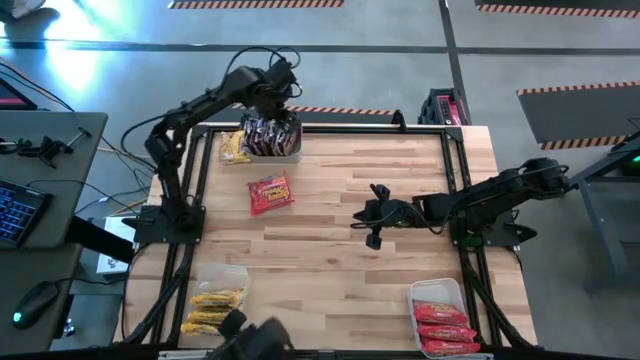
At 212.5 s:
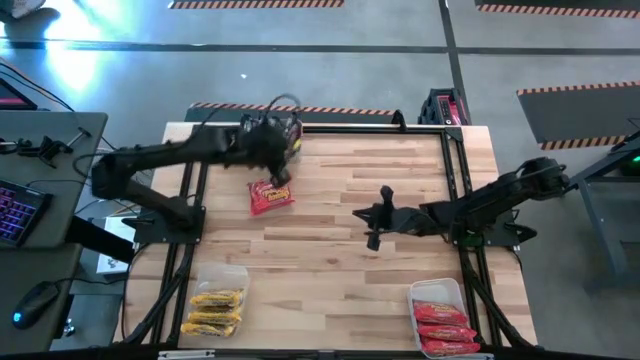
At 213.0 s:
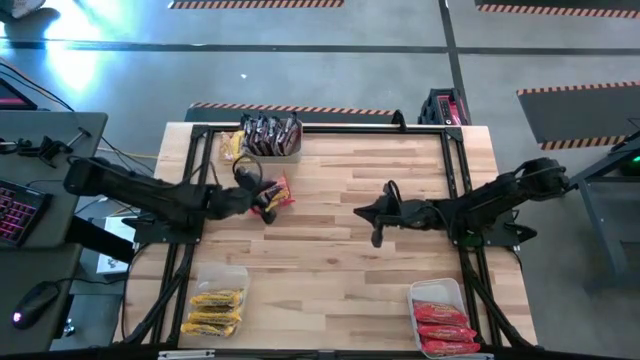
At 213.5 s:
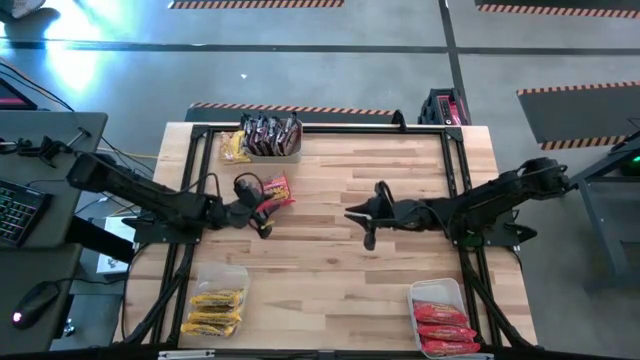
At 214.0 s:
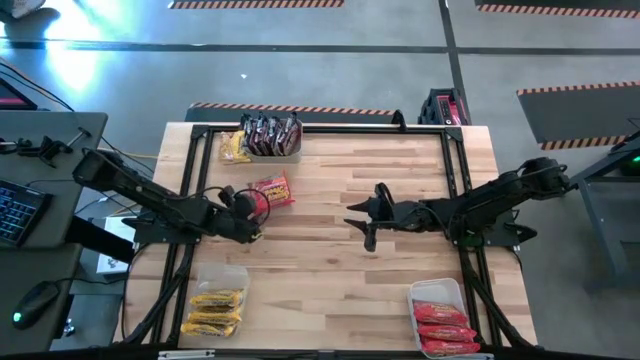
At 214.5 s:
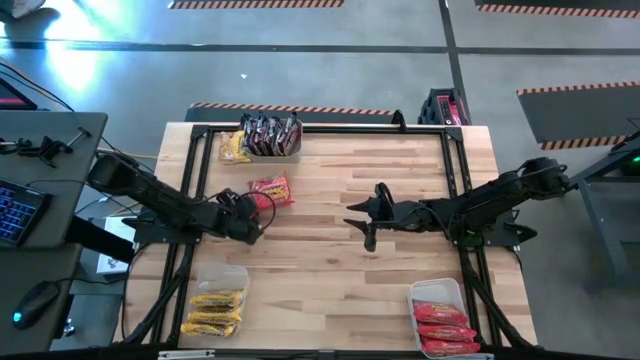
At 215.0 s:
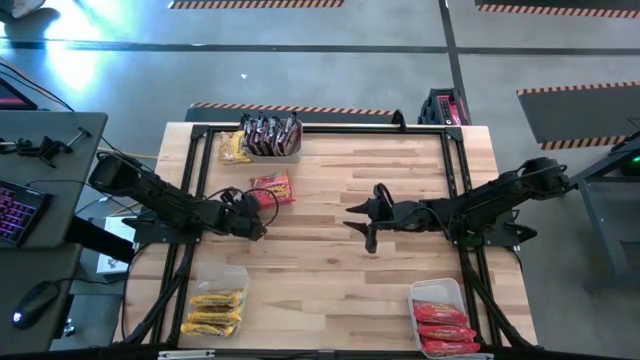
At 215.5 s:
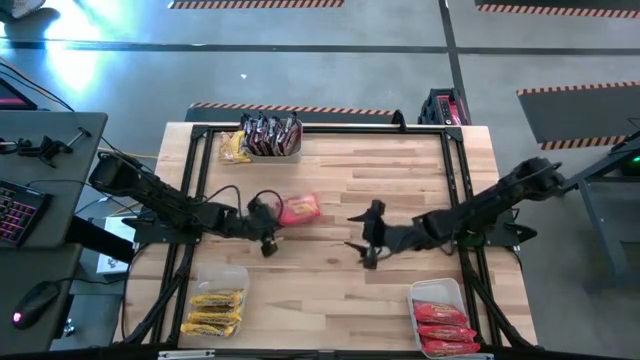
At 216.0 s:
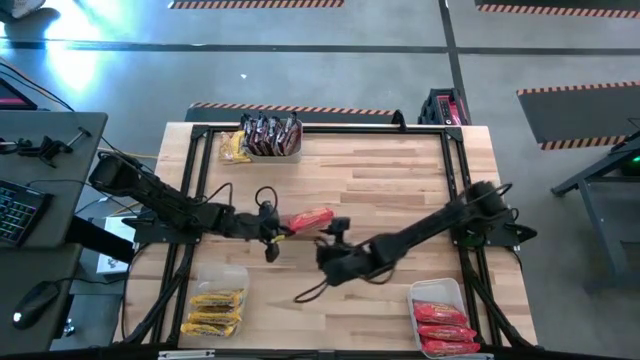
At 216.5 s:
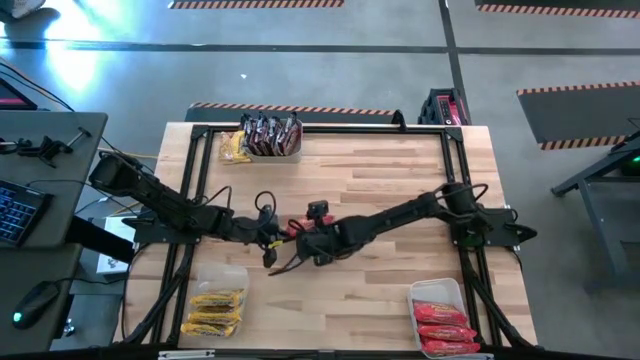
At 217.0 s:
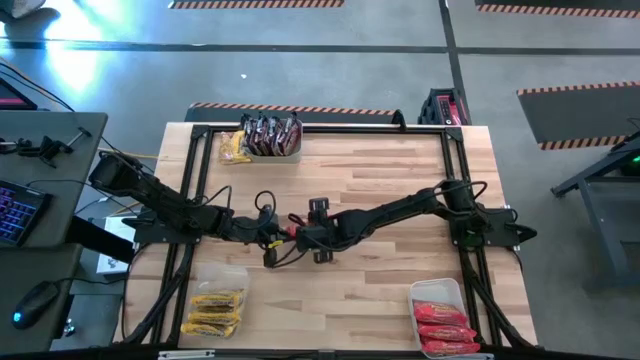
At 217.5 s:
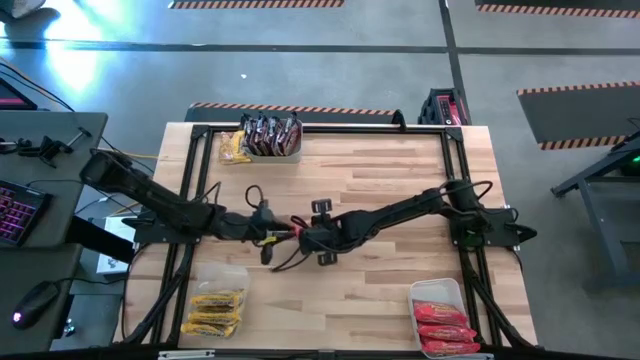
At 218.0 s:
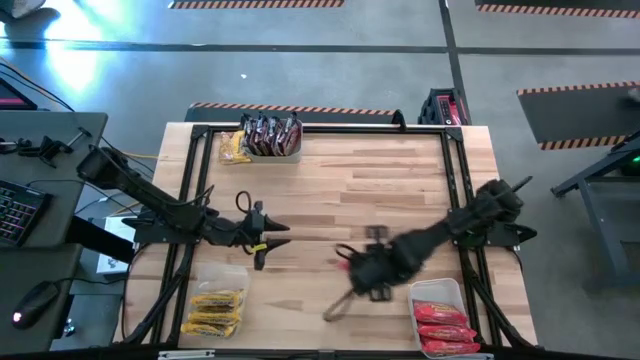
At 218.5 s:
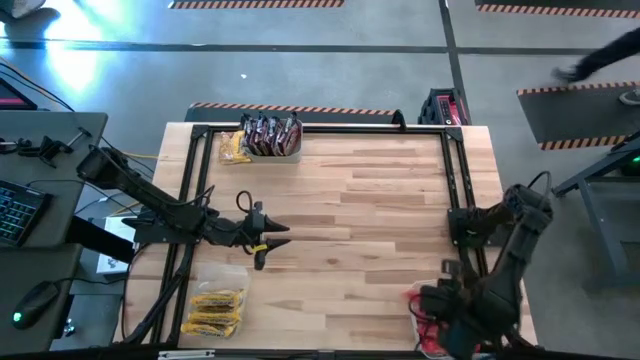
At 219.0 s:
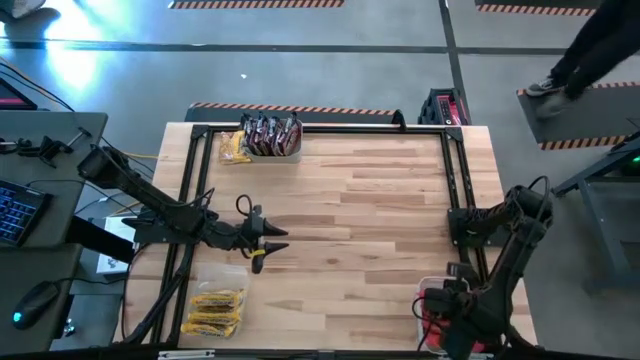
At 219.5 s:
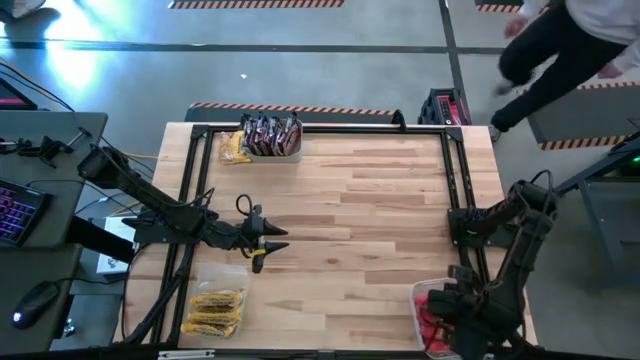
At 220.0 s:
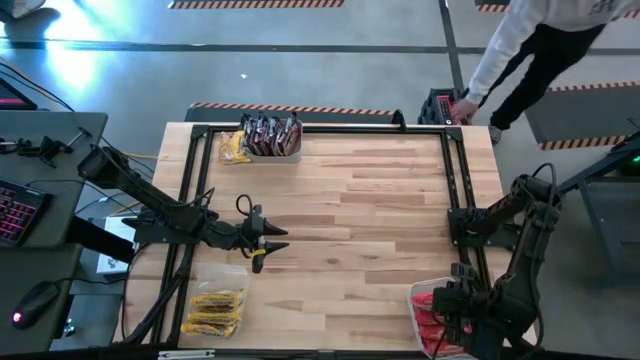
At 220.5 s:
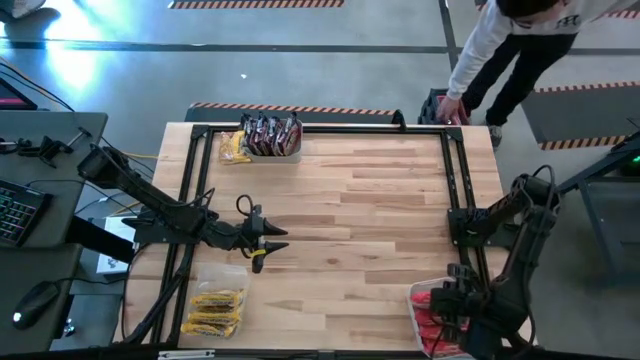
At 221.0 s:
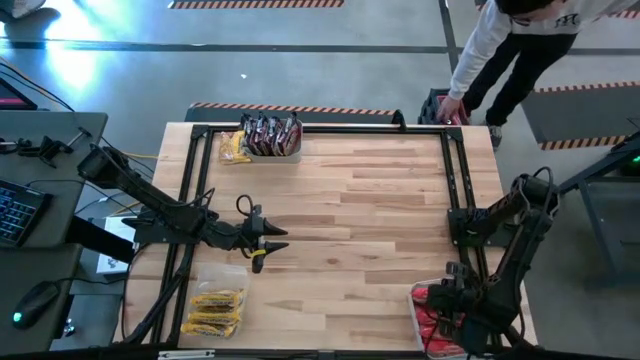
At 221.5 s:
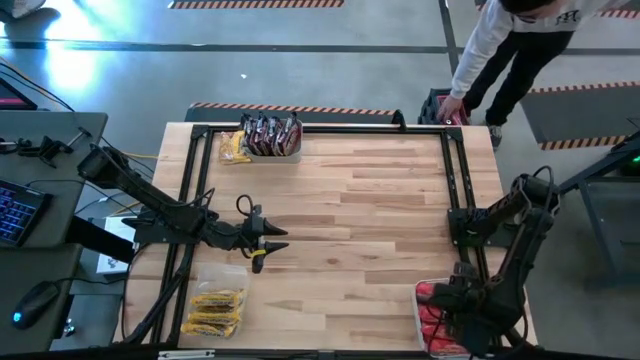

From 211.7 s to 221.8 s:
Task: Sort Maruchan noodles
Put the orange noodle pack into the white bin

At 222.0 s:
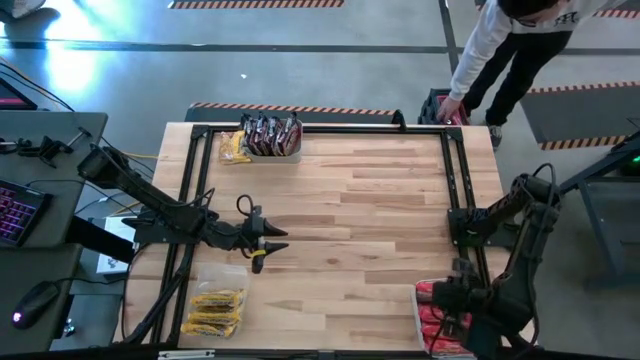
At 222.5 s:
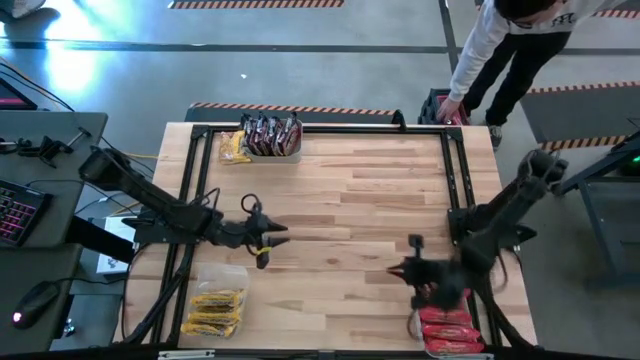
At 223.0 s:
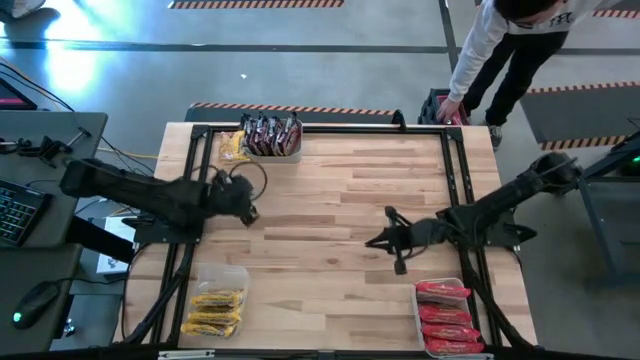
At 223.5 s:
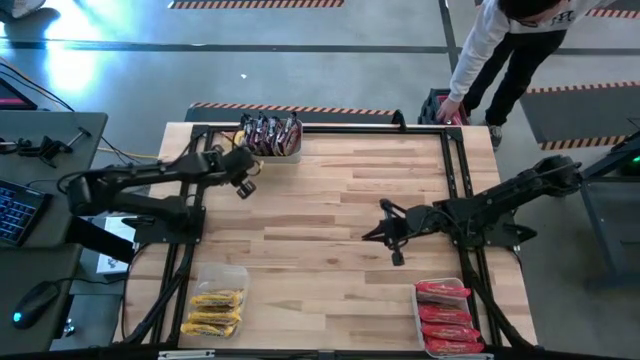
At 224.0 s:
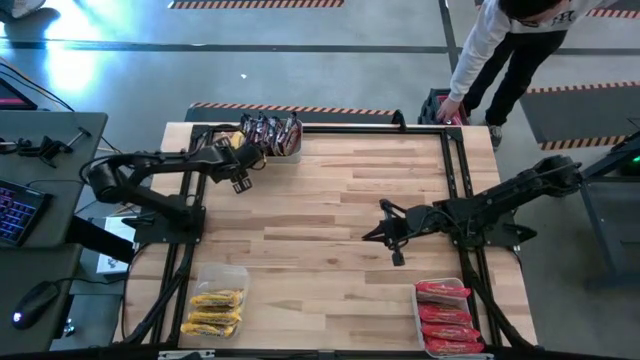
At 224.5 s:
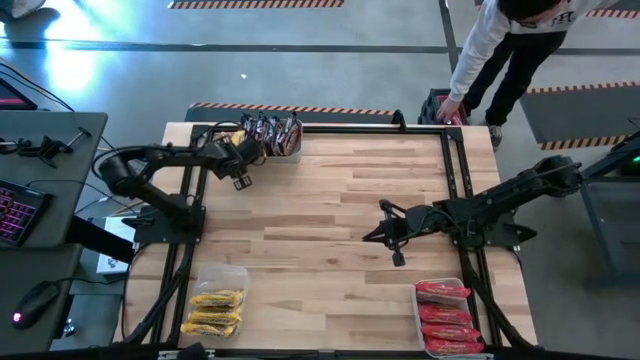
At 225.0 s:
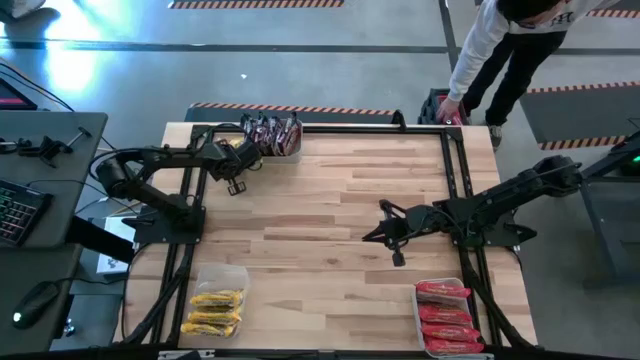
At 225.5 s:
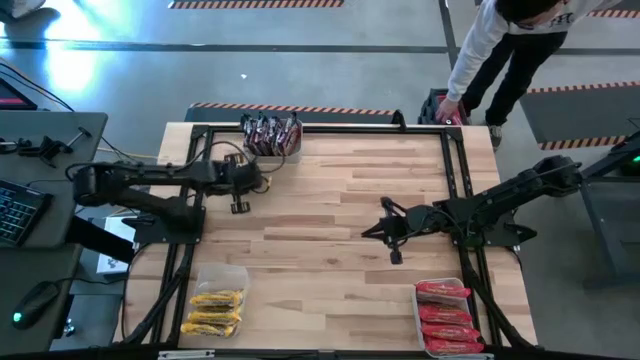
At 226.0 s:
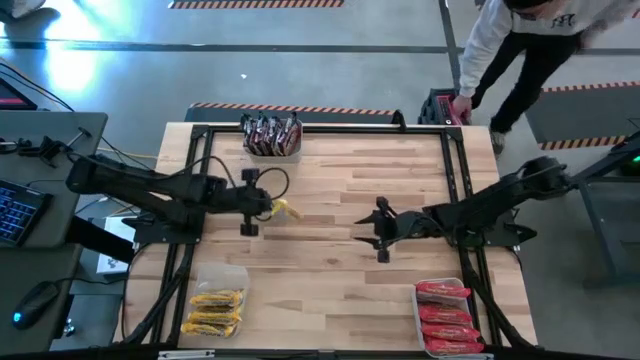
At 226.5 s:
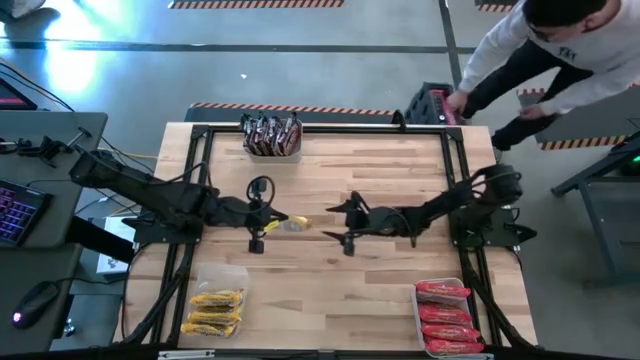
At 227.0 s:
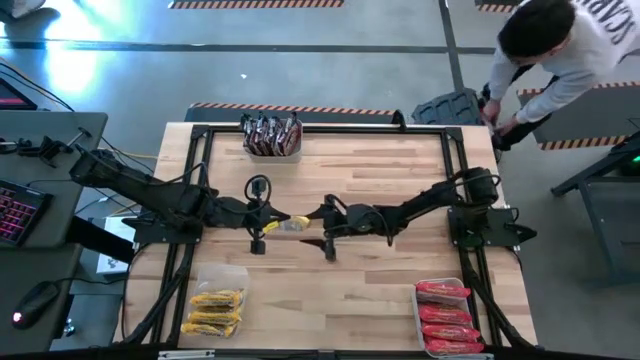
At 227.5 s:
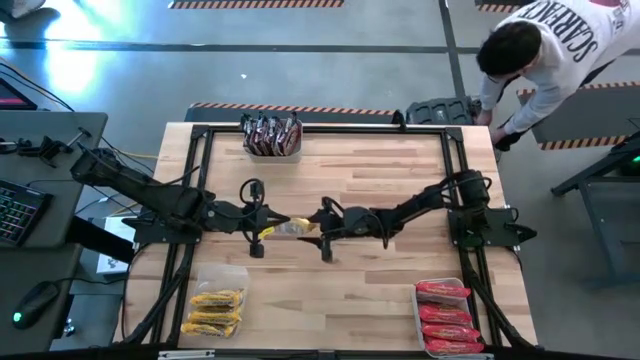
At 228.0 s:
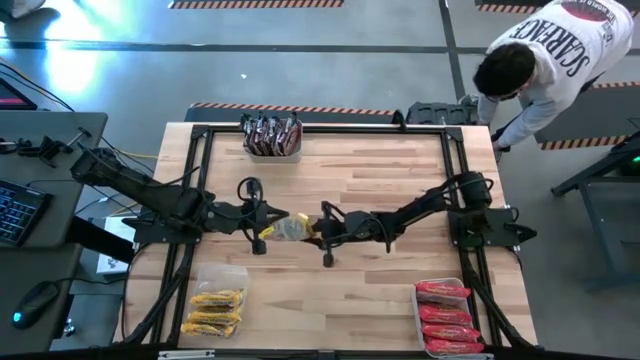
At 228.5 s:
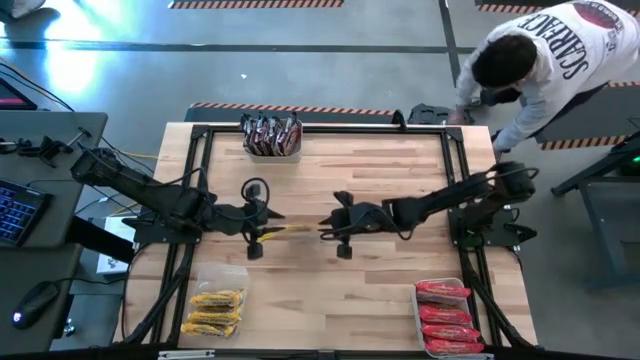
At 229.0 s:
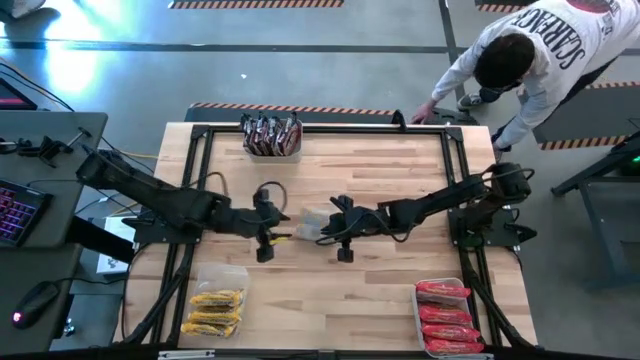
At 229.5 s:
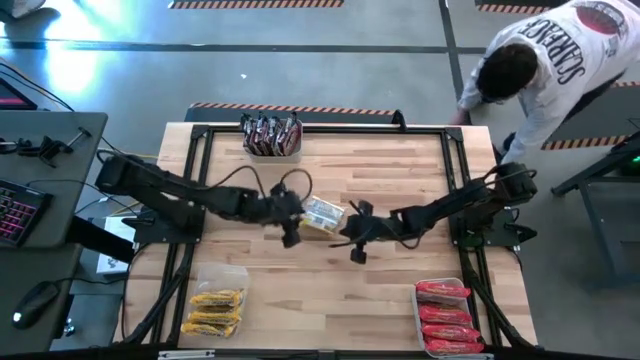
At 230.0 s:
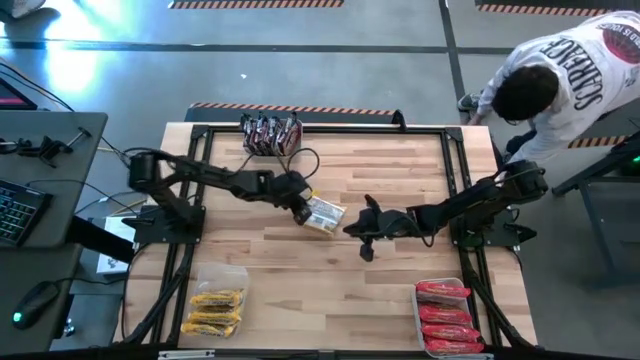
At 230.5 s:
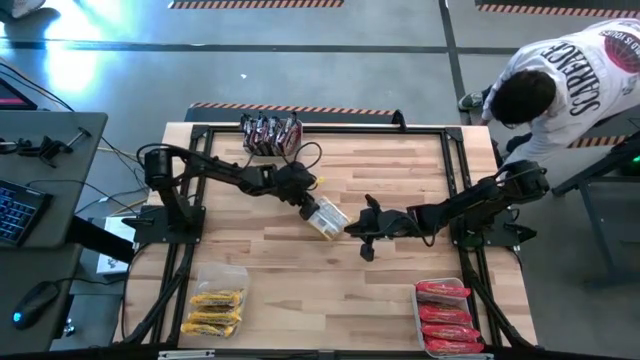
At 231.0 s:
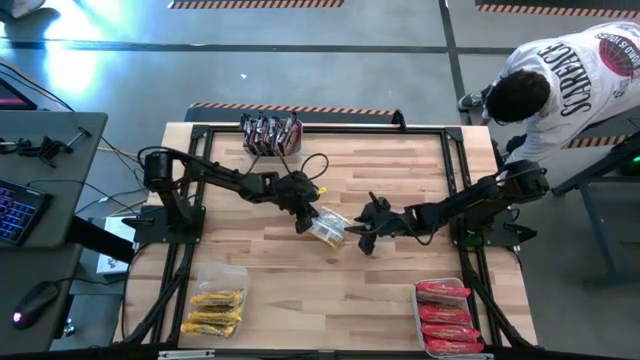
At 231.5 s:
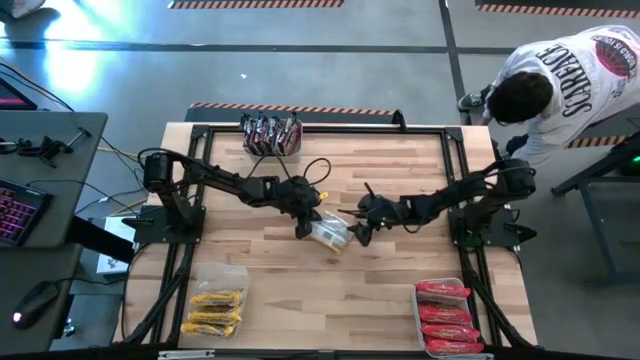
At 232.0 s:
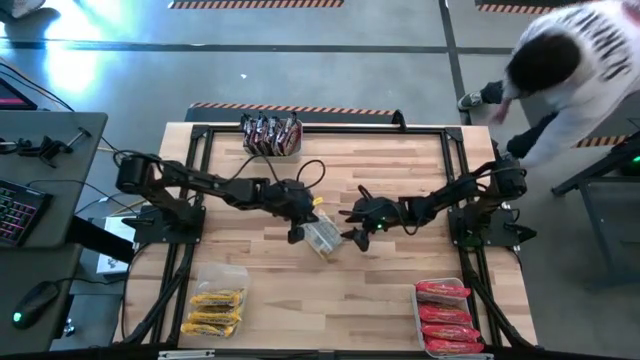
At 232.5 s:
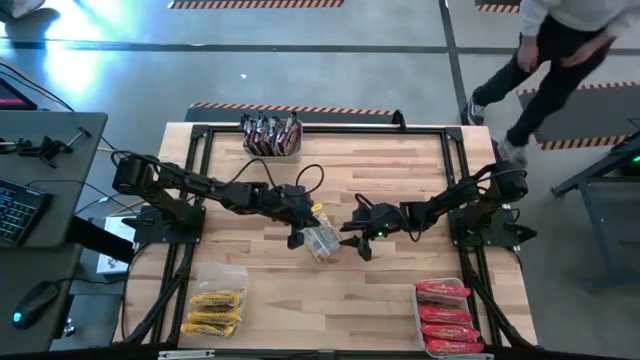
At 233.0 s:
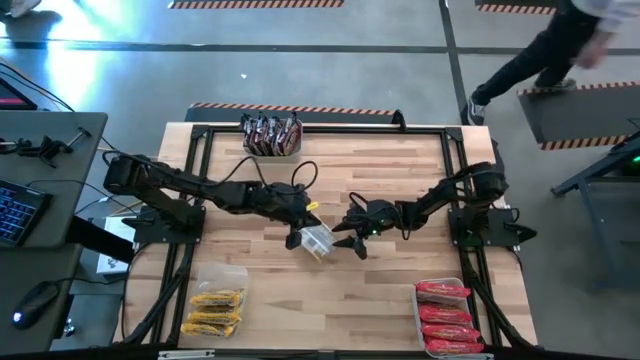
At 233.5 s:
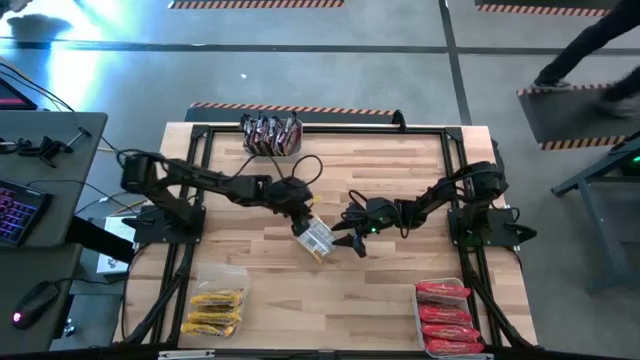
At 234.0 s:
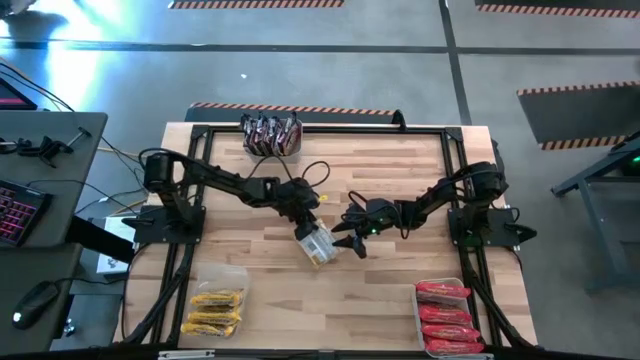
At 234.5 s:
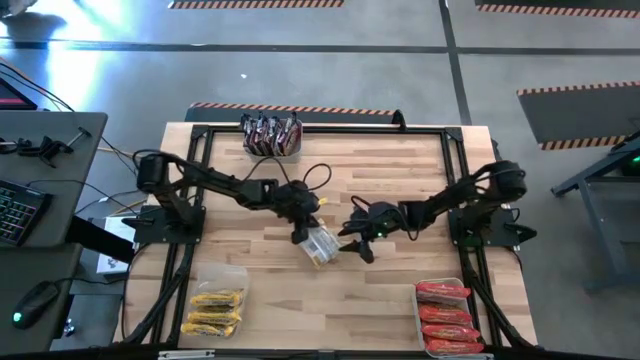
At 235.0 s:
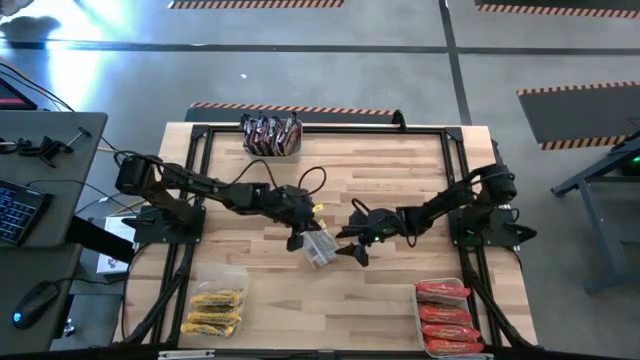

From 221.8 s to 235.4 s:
Put the yellow noodle pack into the transparent bin
